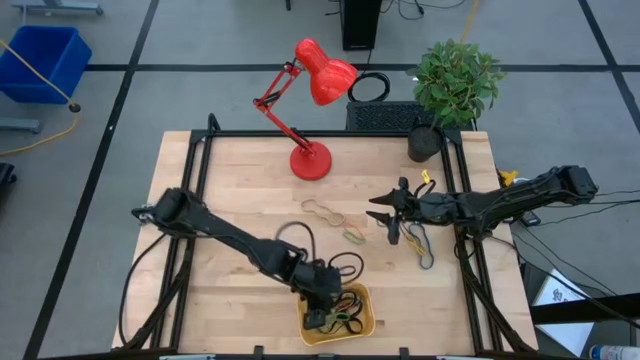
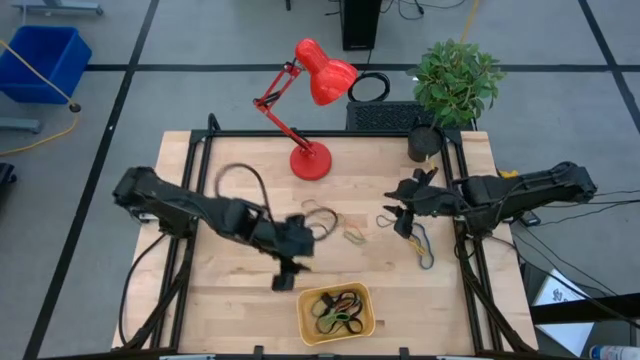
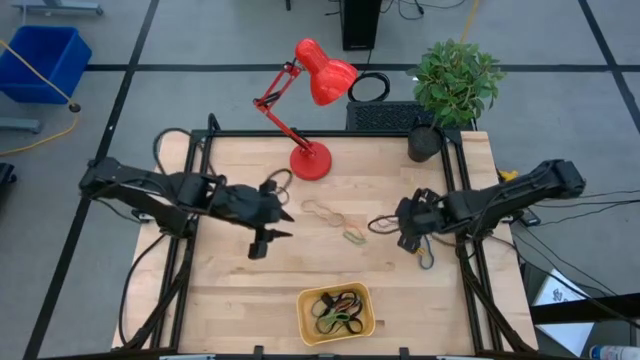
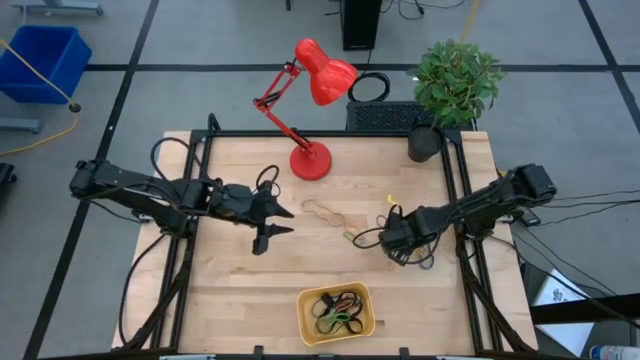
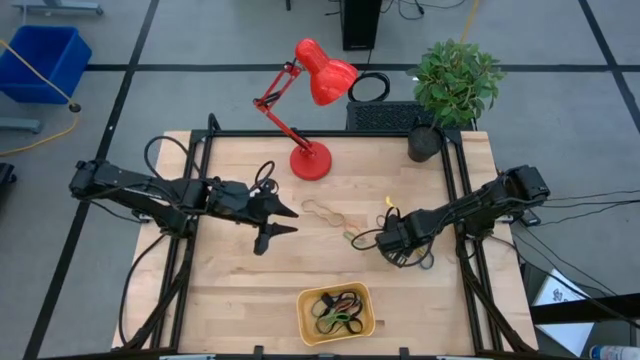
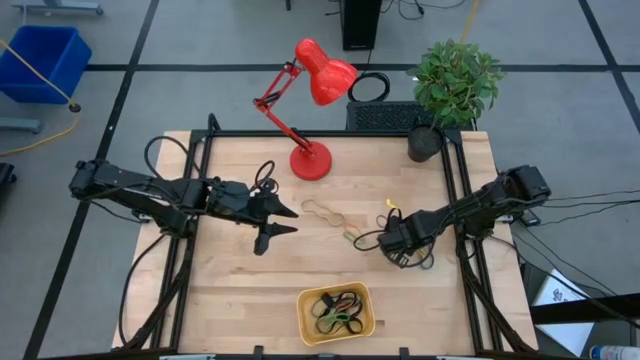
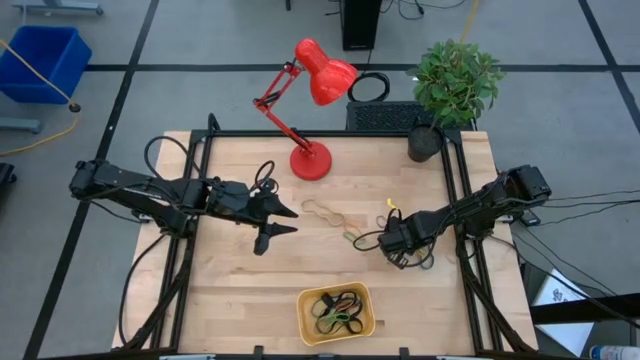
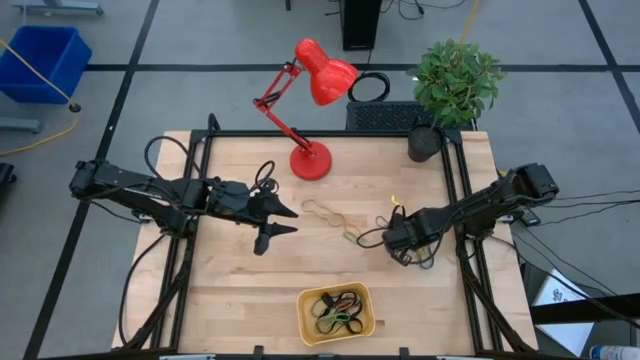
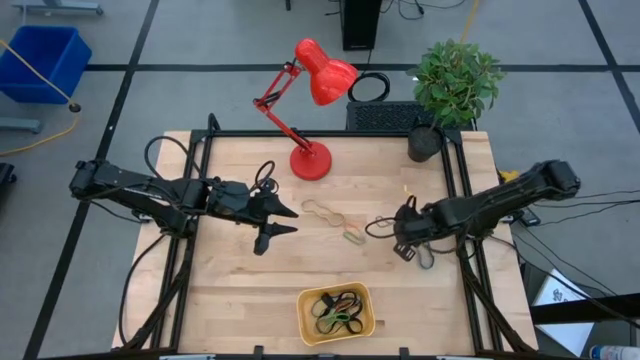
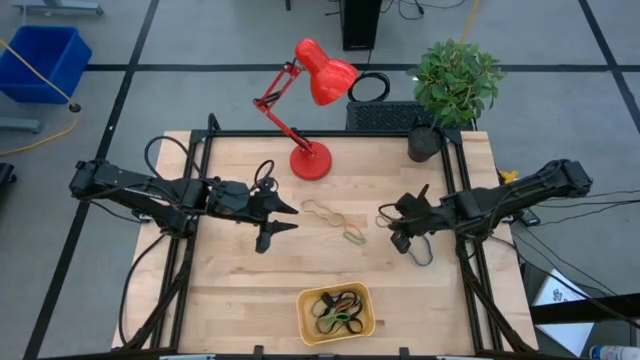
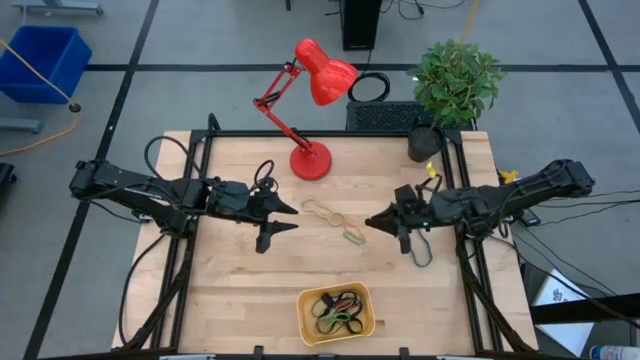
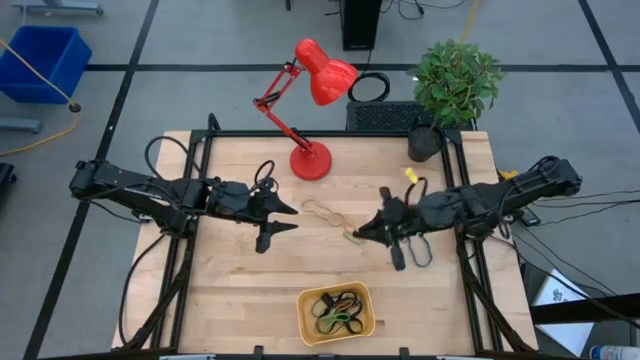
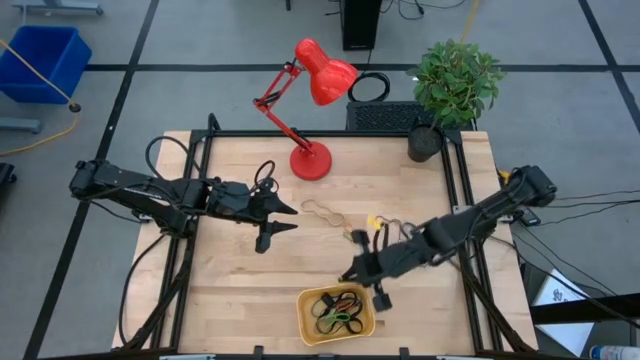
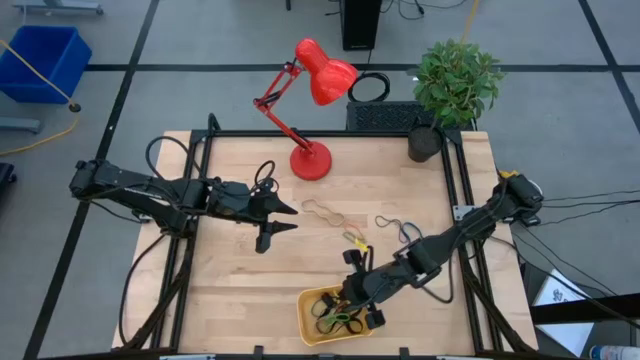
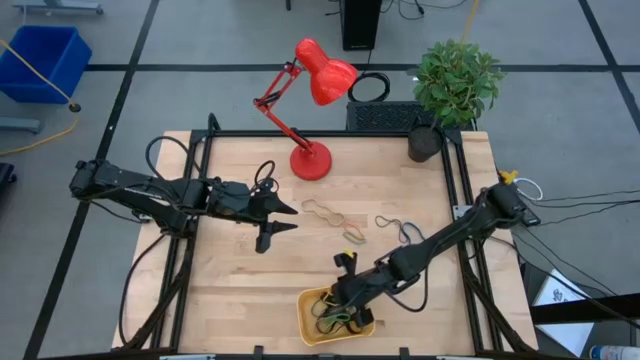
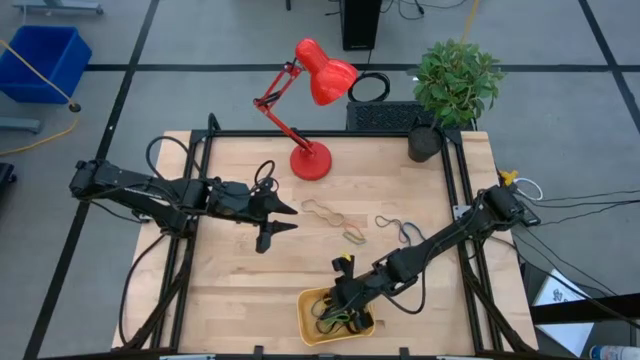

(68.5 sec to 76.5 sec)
Task: Pick and place rubber bands into bin
Put the yellow rubber band into the yellow bin

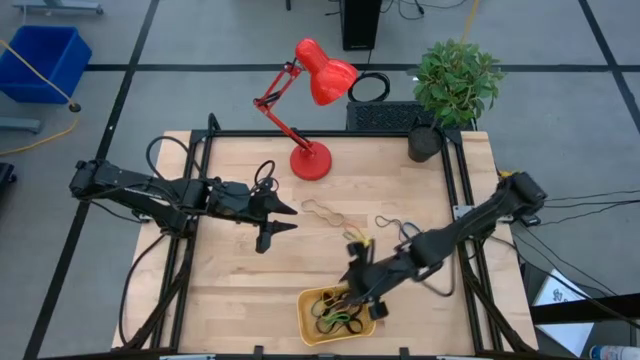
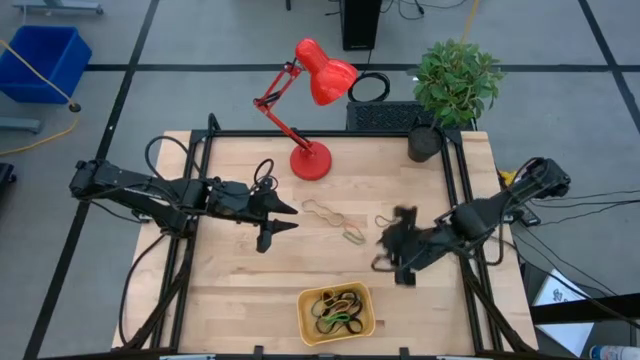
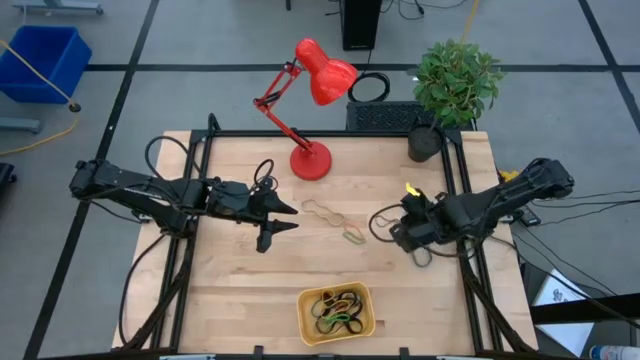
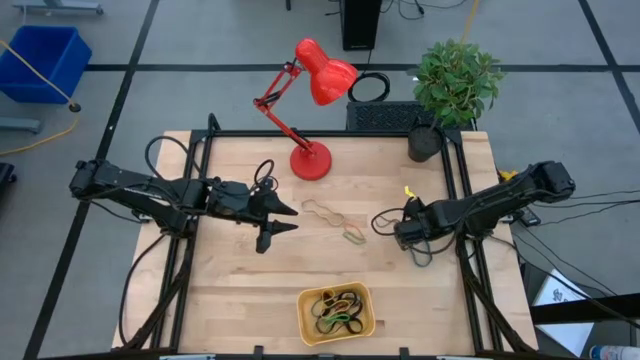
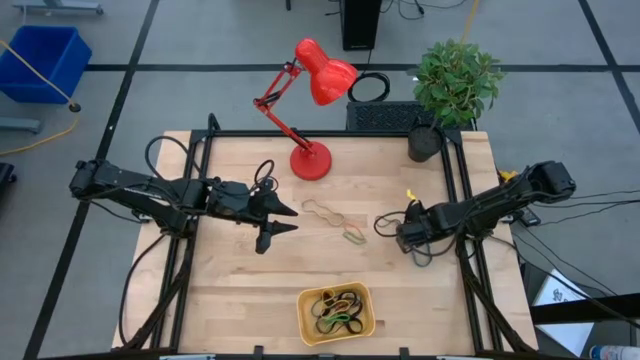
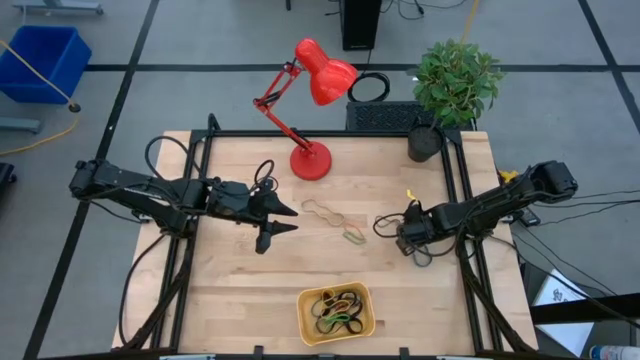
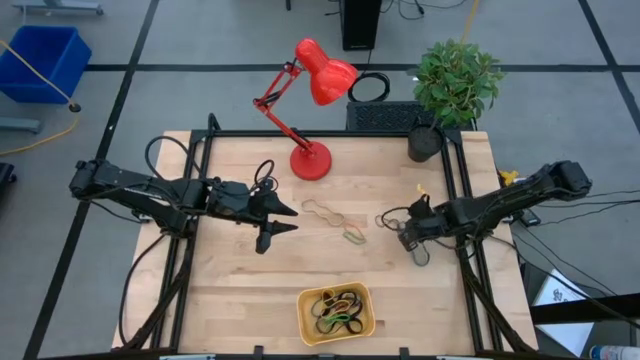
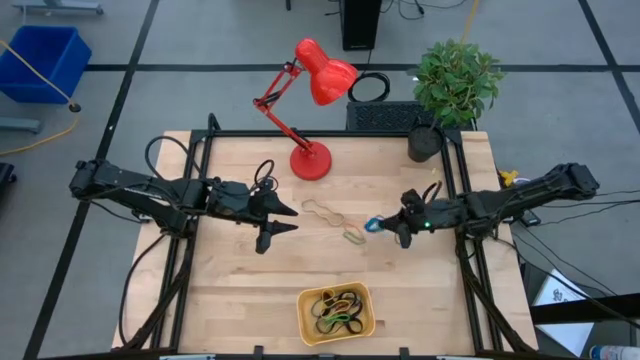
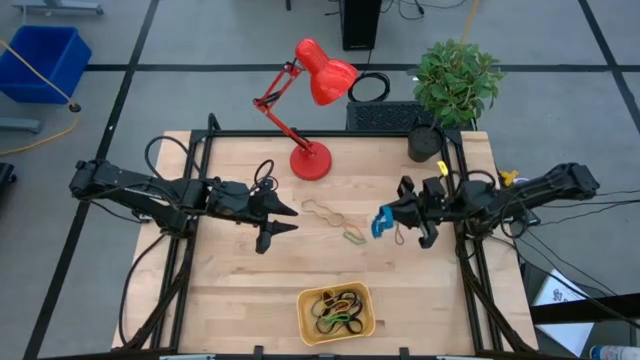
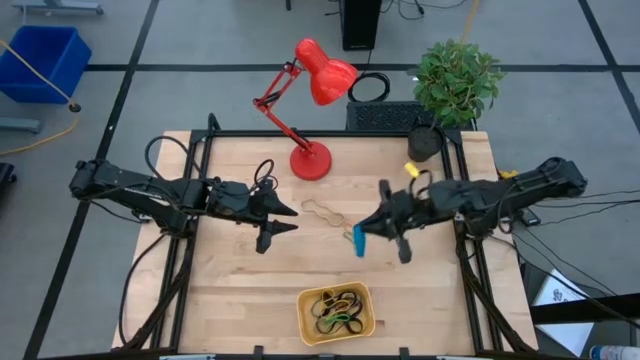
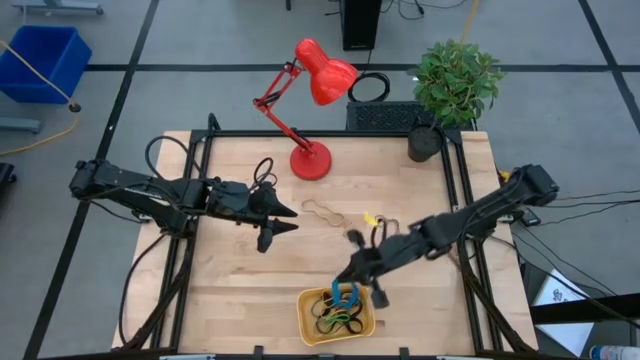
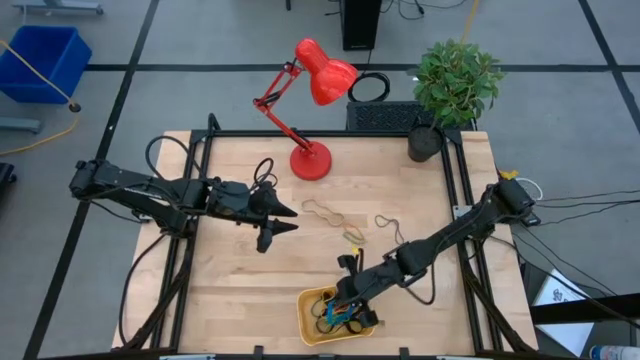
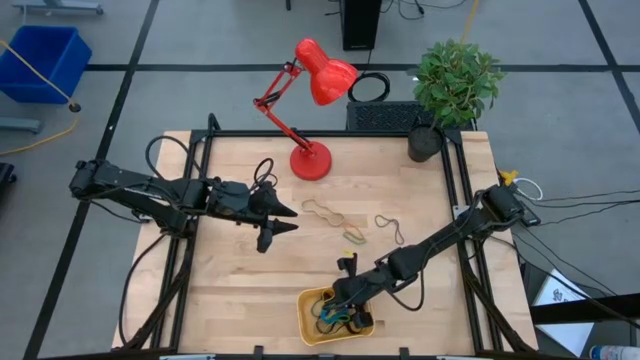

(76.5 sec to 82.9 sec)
Put the blue rubber band into the yellow bin

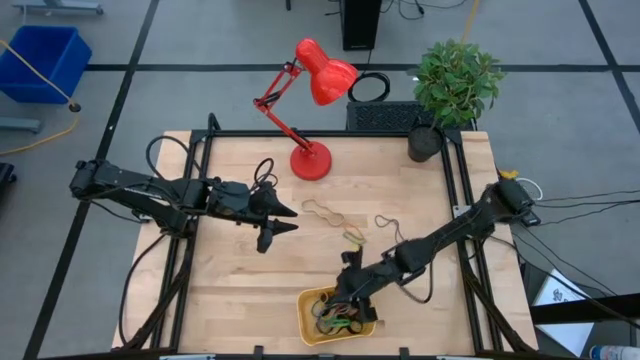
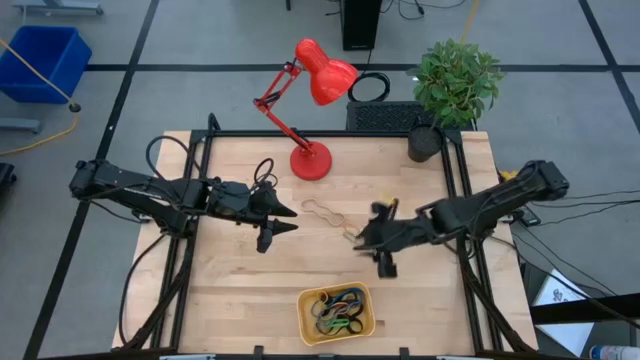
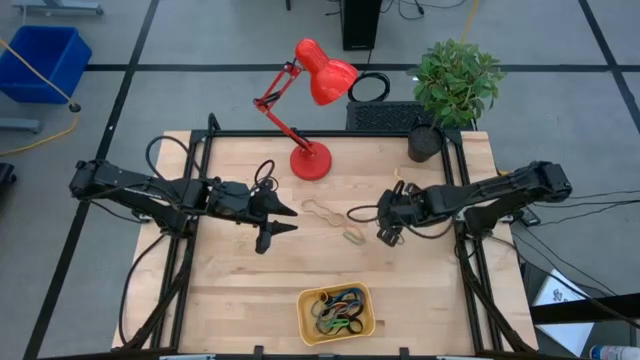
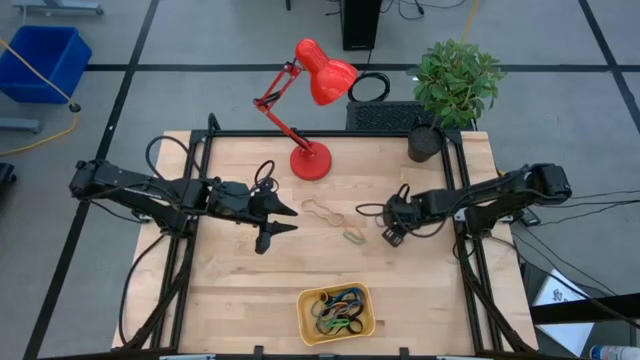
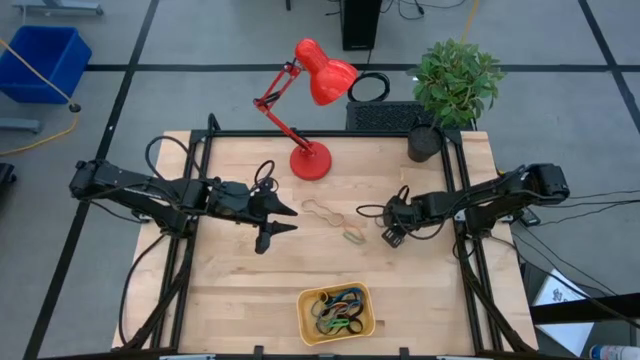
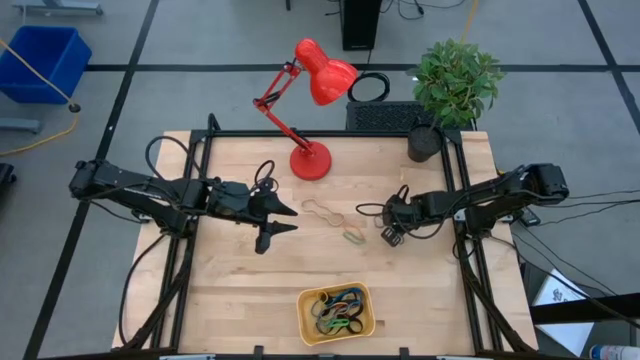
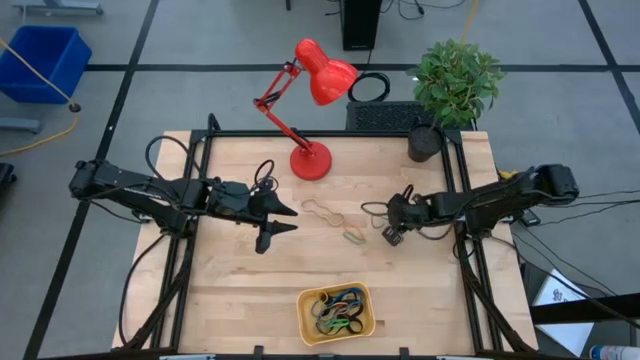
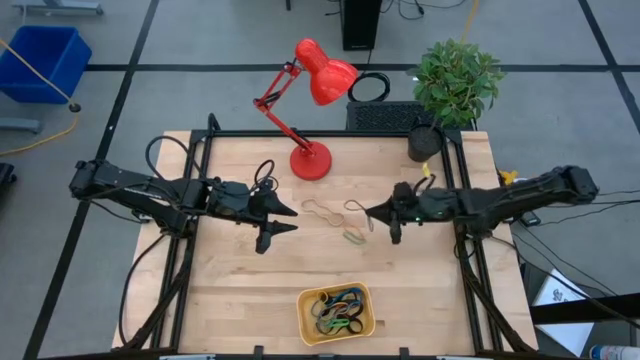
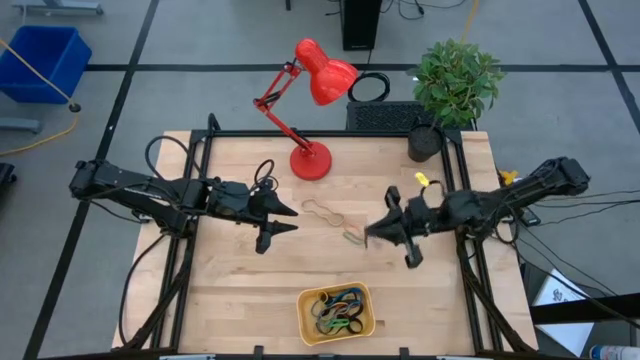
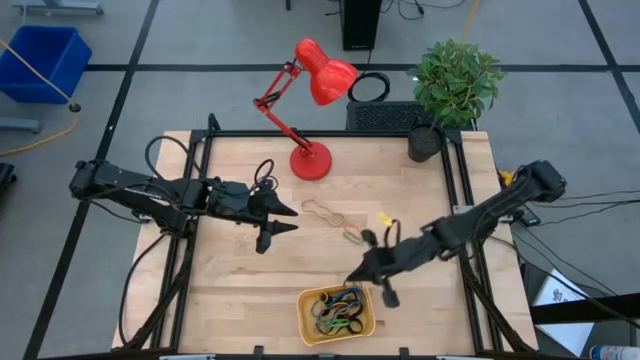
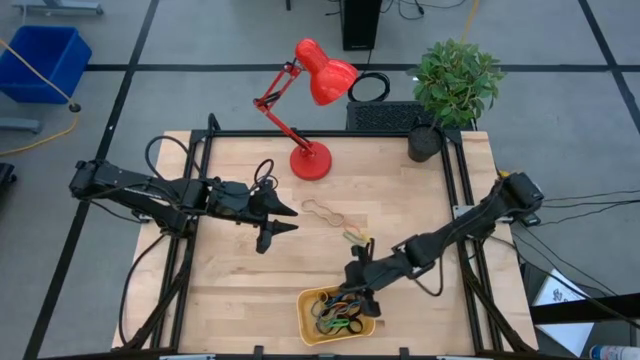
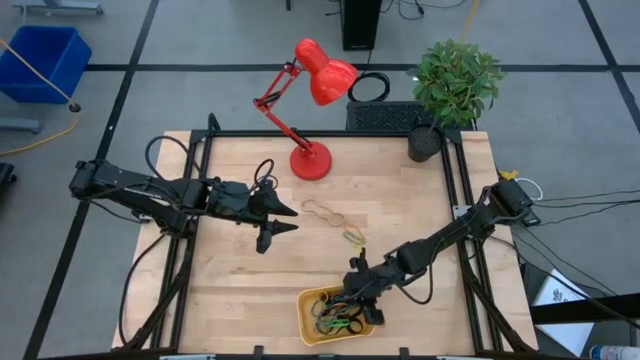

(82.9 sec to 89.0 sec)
Put the purple rubber band into the yellow bin

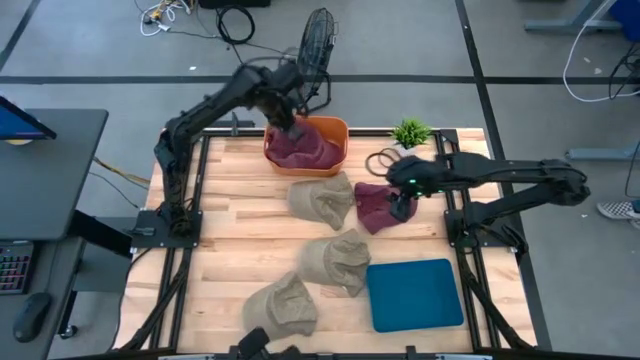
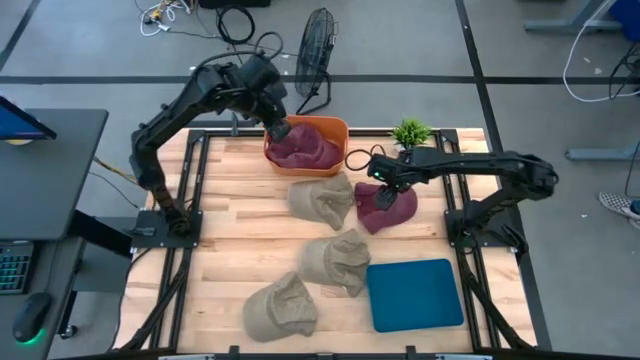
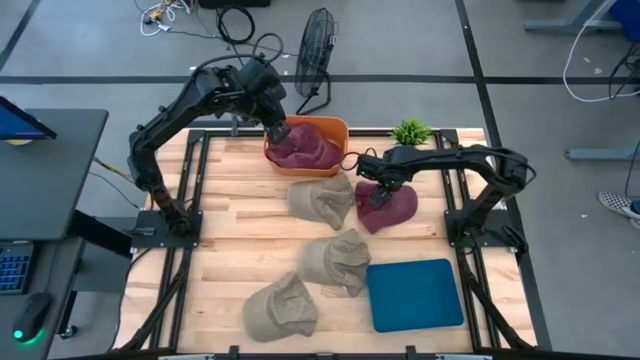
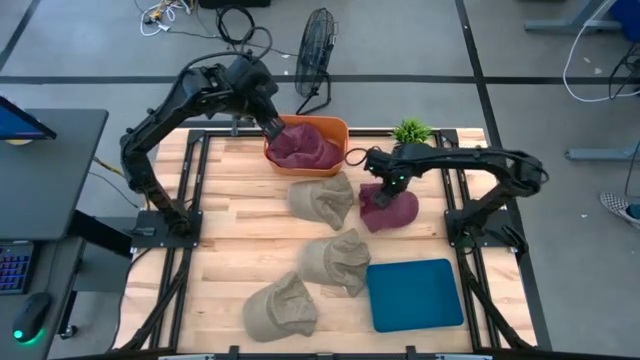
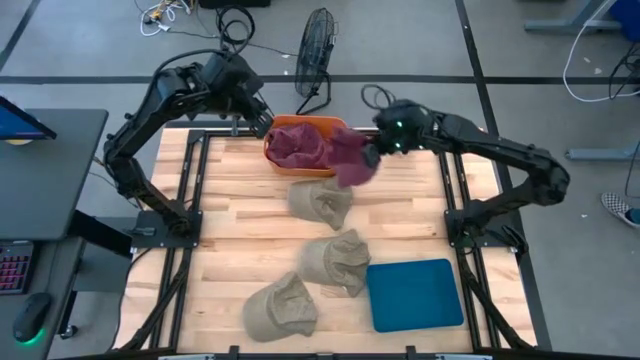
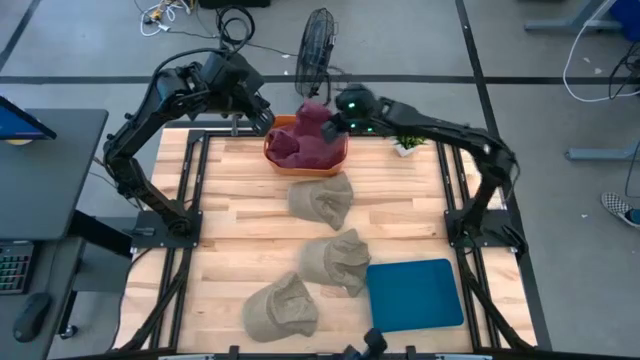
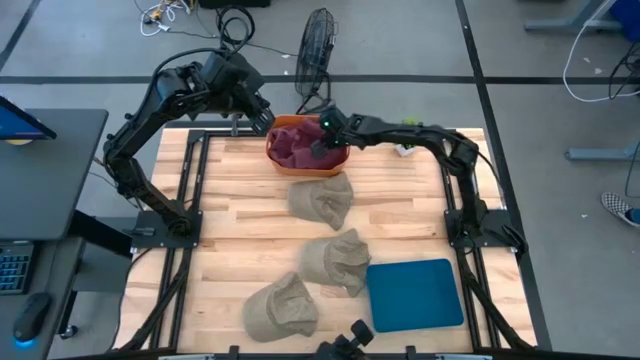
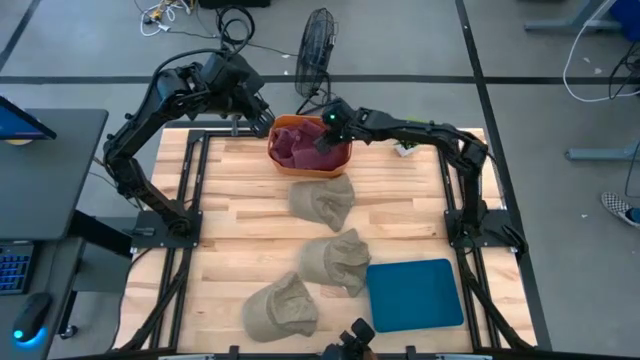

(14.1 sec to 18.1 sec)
Task: Pick & Place hat
Put the red cap into the orange bin
